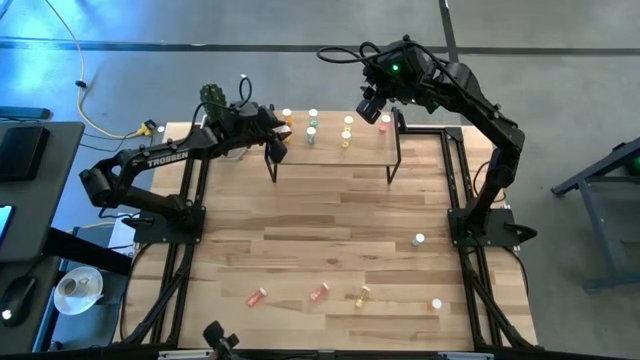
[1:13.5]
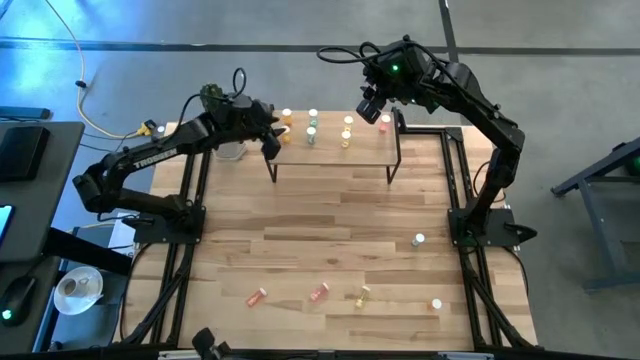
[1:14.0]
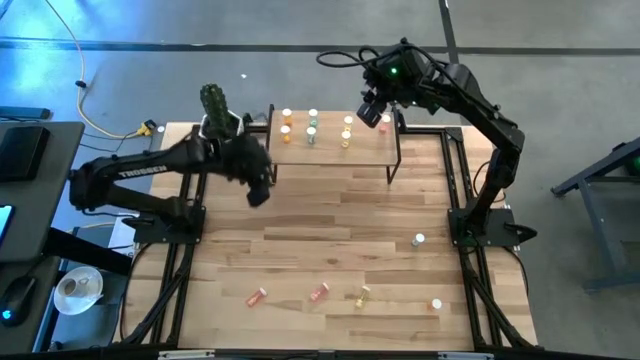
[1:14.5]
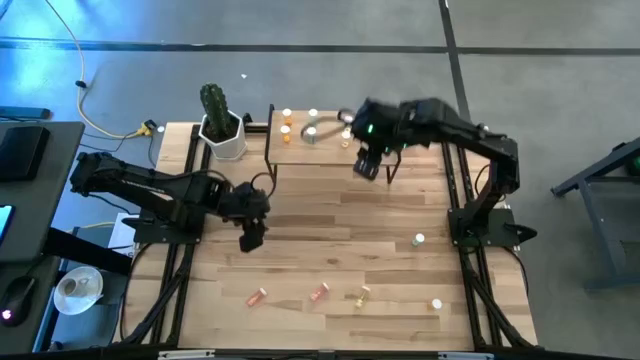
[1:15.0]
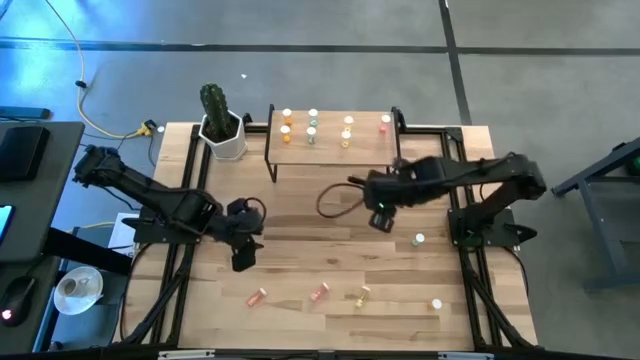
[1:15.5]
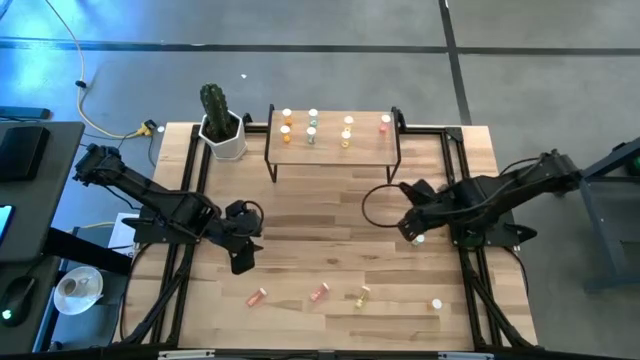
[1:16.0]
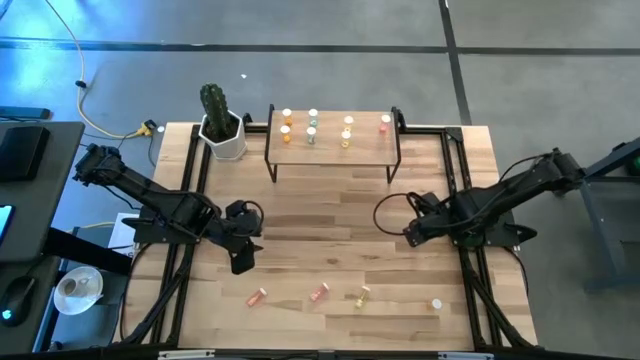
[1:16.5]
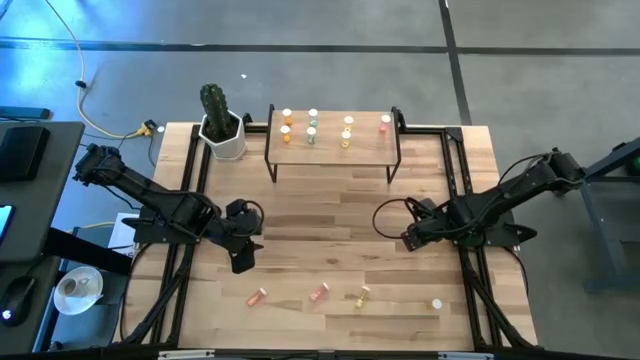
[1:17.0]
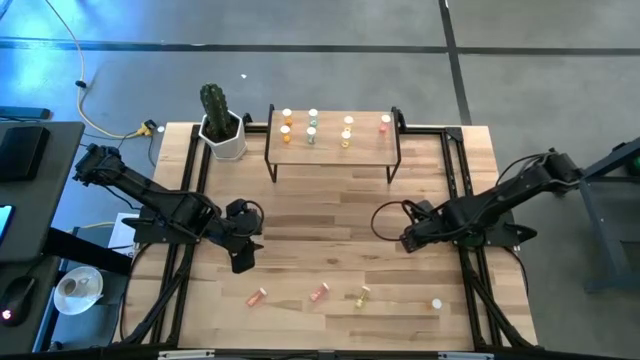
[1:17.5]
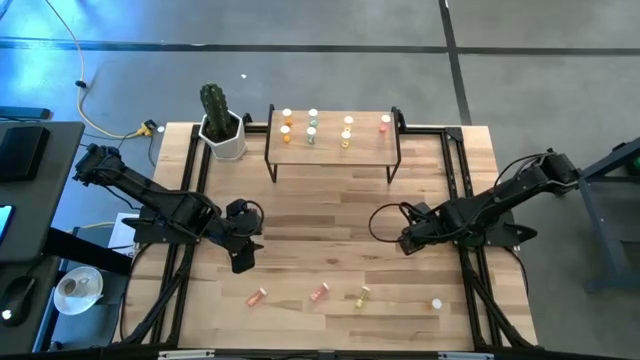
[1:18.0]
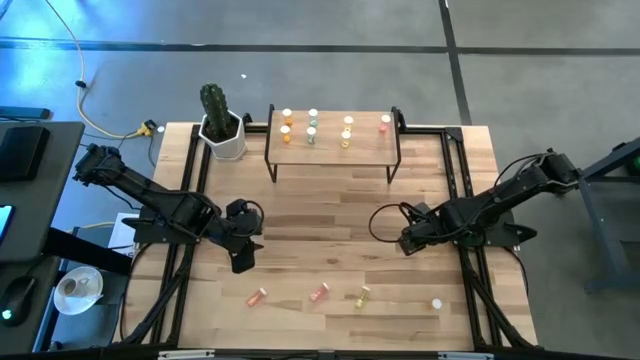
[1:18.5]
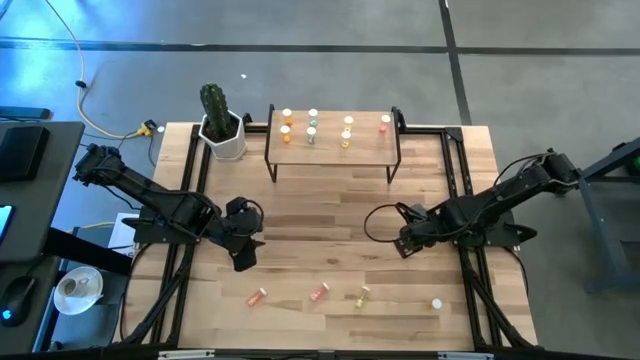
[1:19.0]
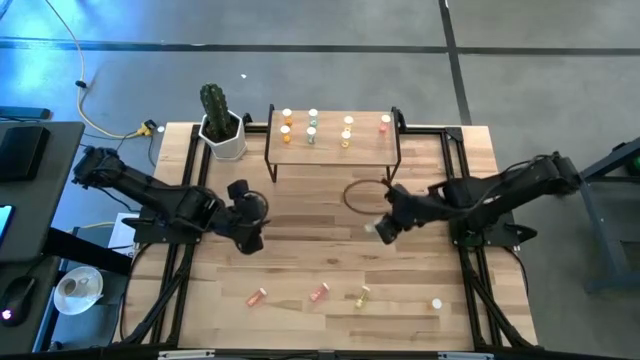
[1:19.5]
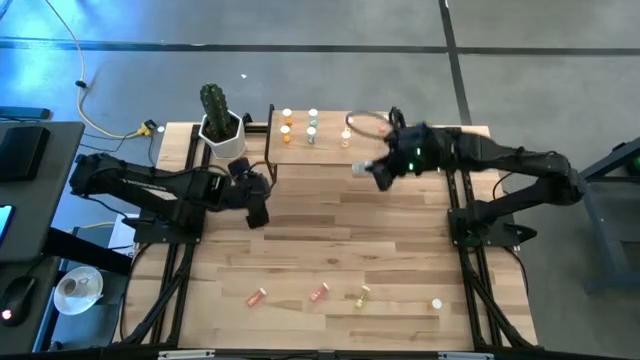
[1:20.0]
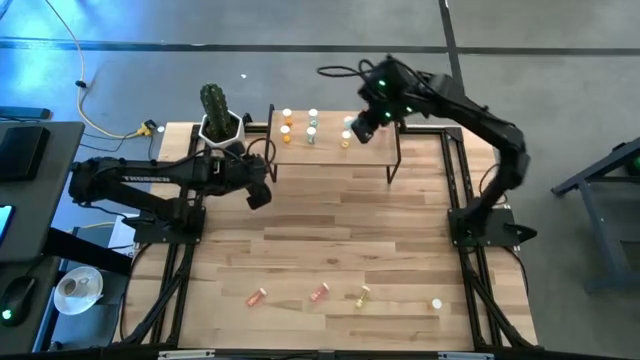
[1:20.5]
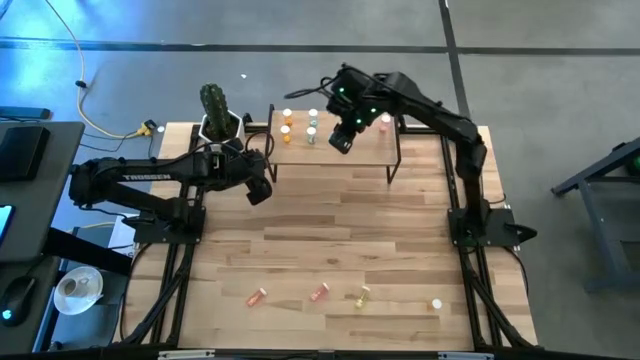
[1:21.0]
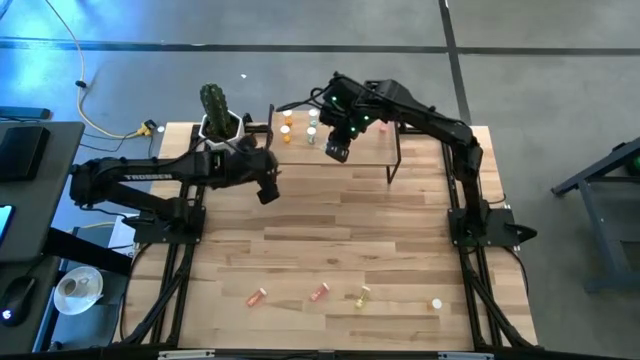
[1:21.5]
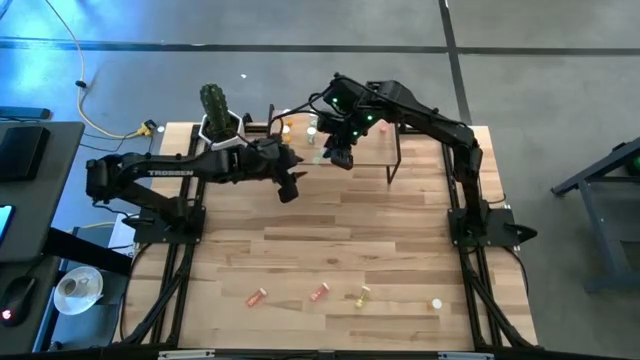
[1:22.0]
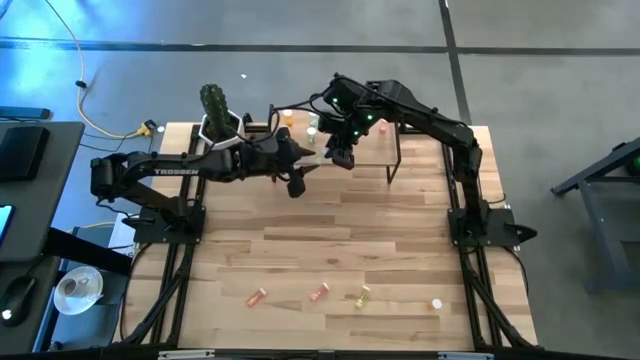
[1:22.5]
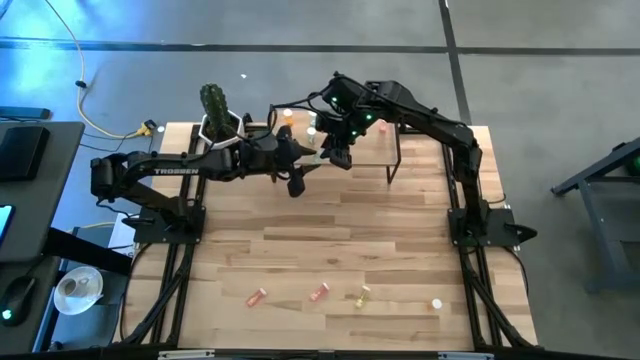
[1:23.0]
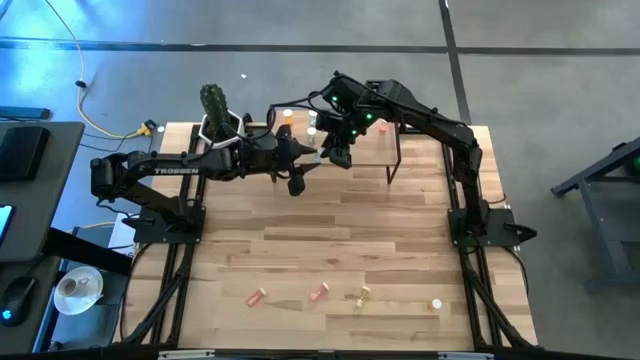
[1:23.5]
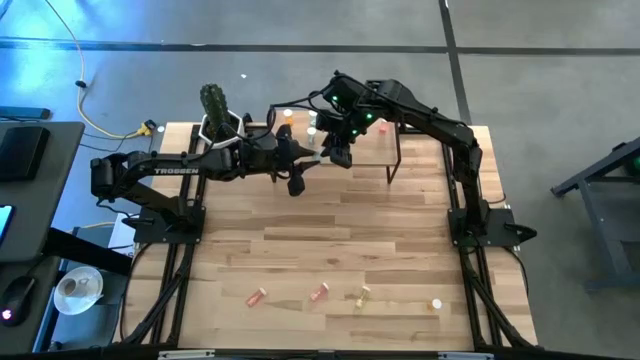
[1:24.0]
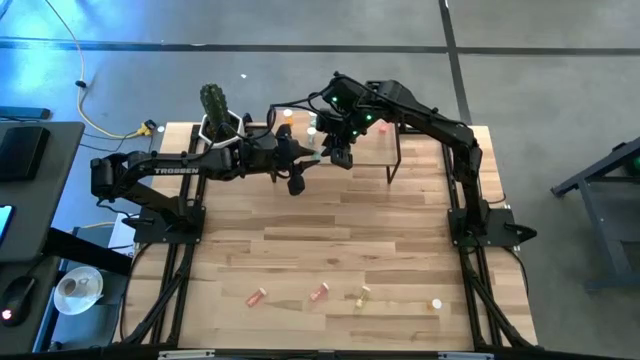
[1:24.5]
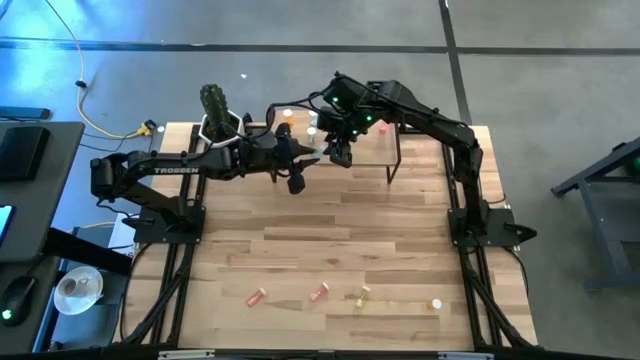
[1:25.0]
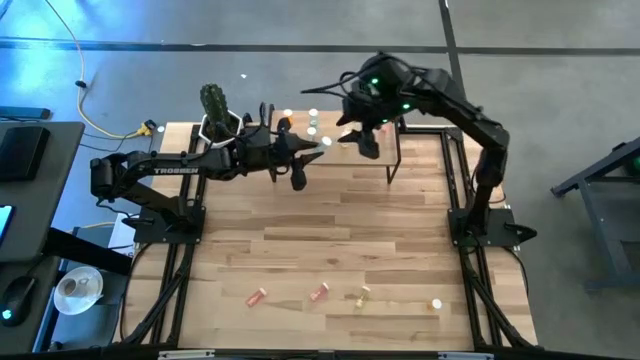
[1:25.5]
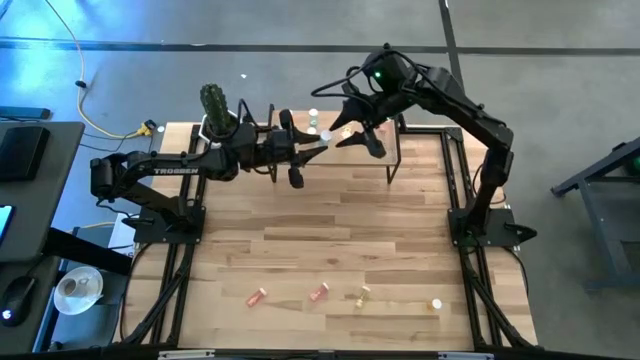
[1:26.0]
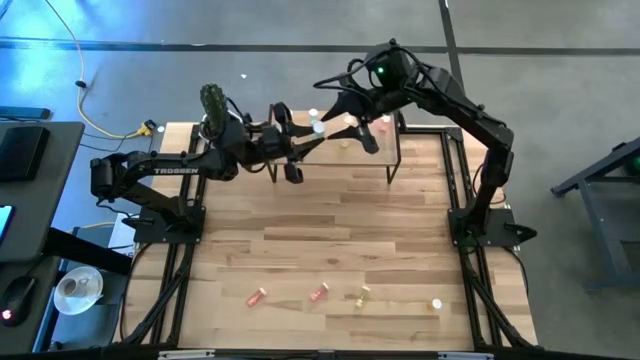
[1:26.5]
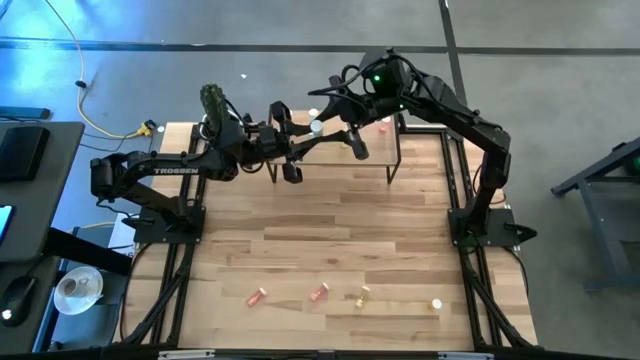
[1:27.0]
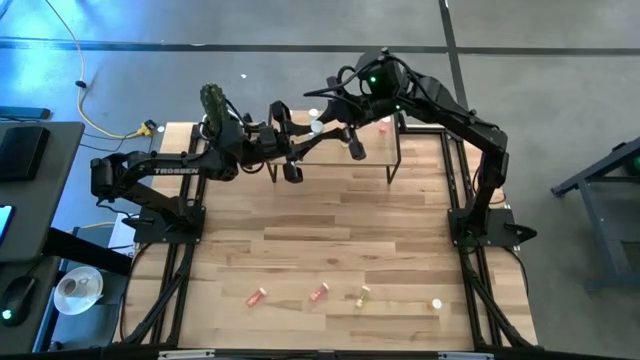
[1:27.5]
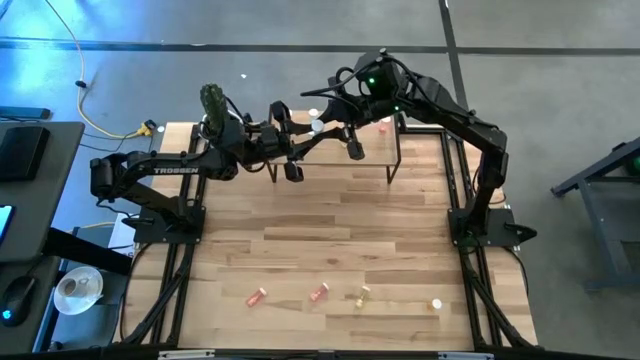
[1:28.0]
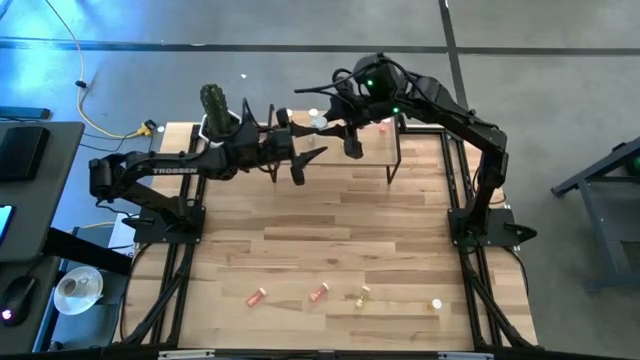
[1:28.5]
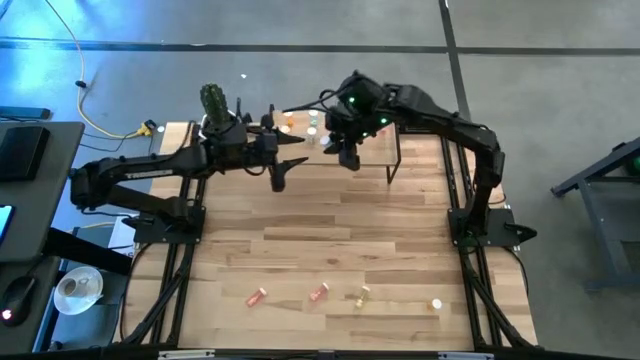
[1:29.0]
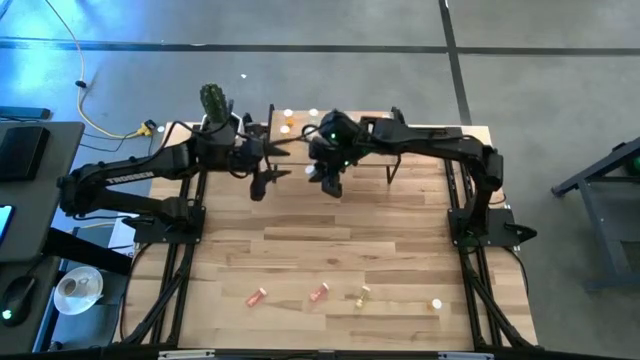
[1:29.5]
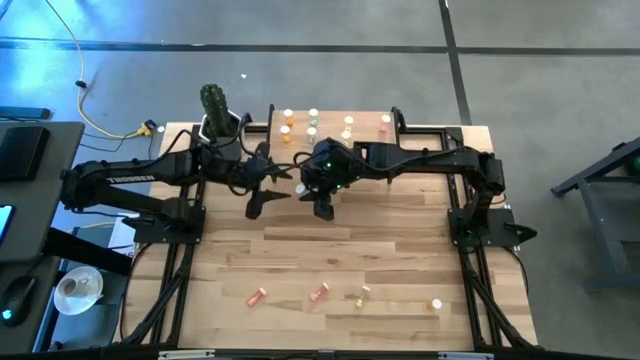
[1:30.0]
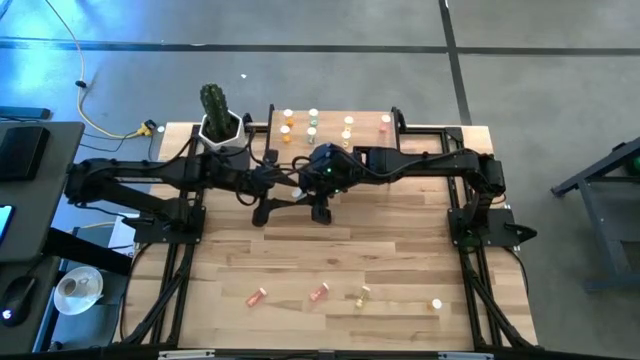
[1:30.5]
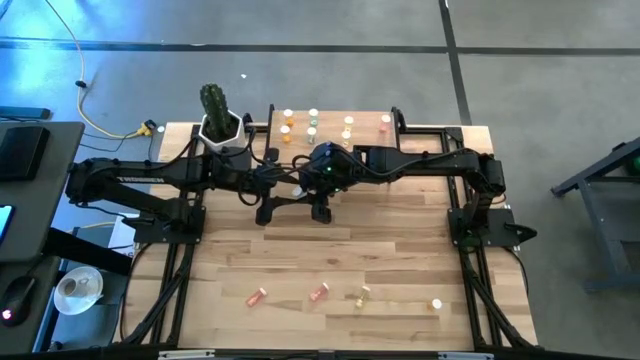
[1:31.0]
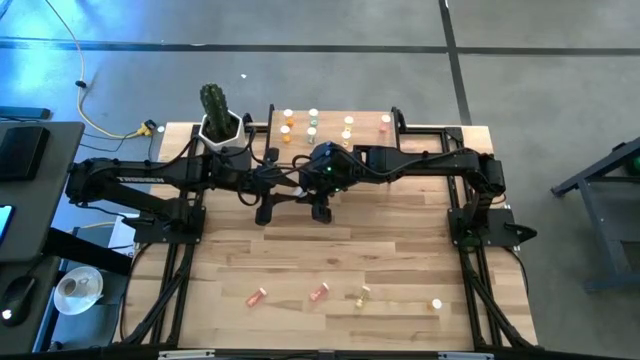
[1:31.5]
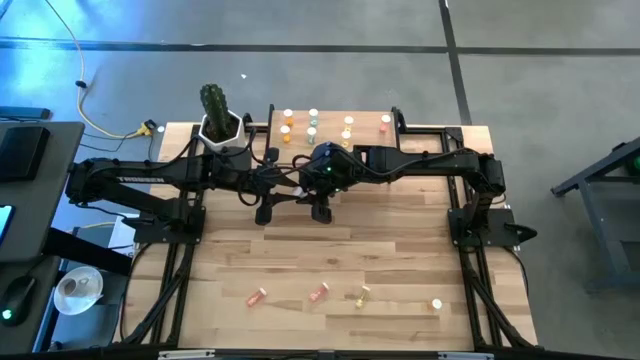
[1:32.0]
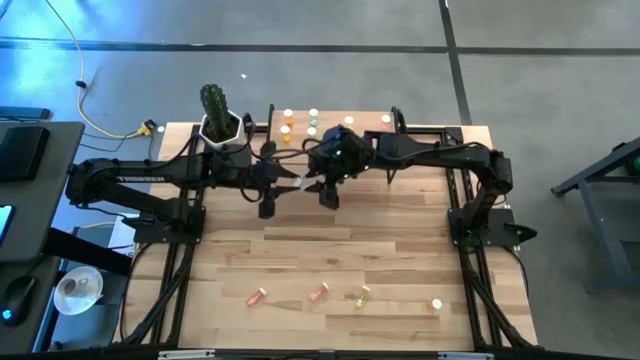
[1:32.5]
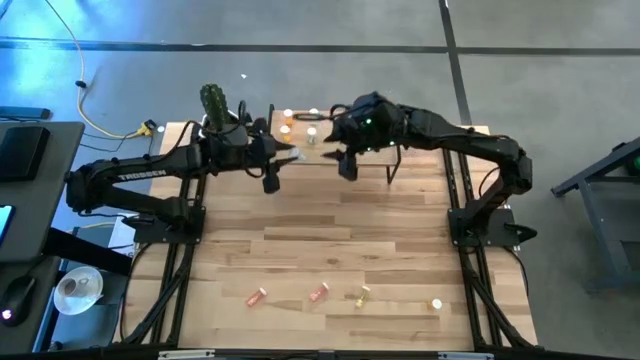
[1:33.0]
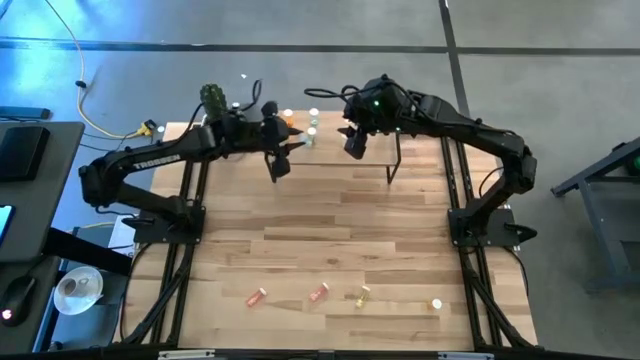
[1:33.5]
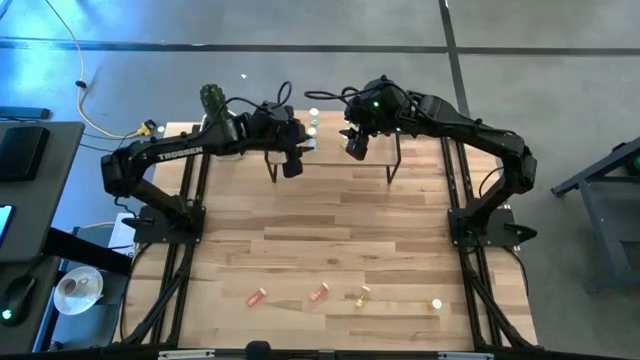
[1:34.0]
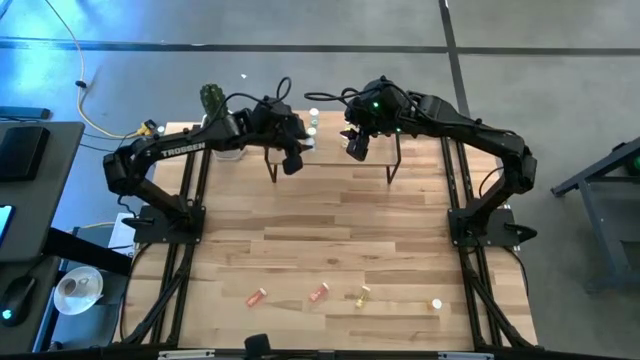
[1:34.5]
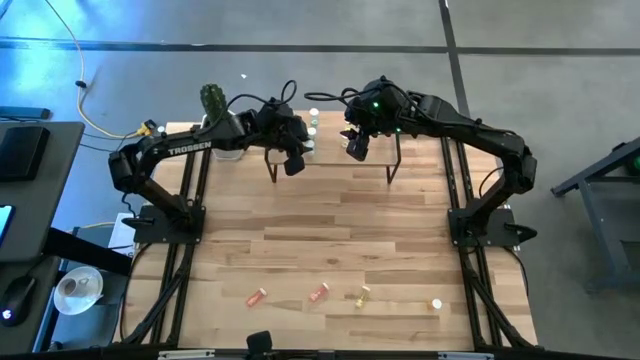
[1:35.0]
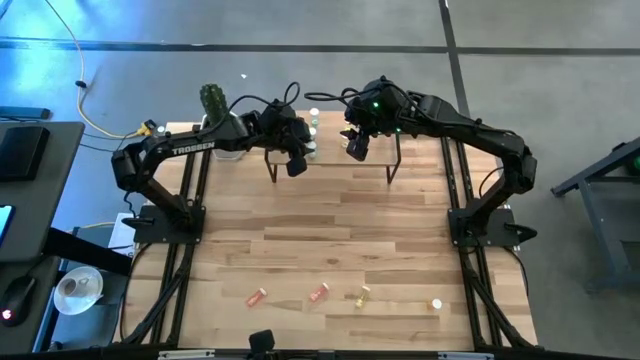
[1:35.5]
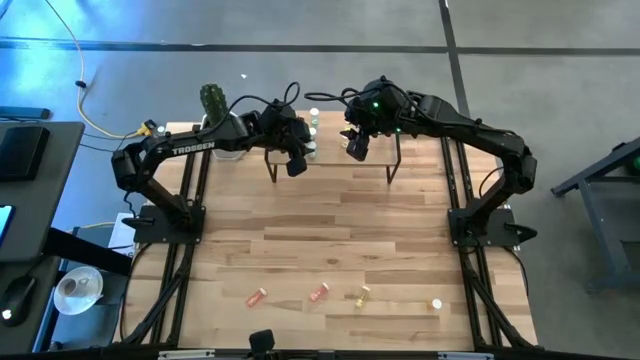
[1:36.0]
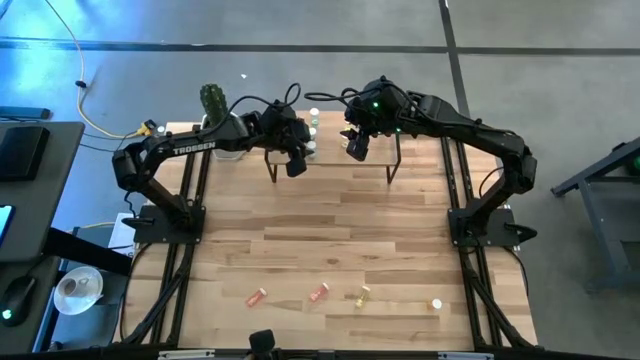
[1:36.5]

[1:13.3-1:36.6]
Task: Pick and place medicine bottles onto shelf by color
Put the blue pill bottle on the shelf
